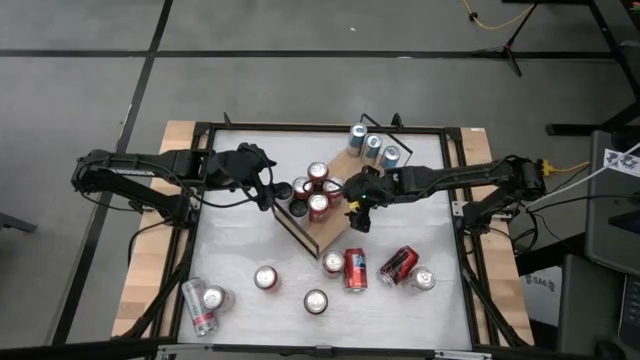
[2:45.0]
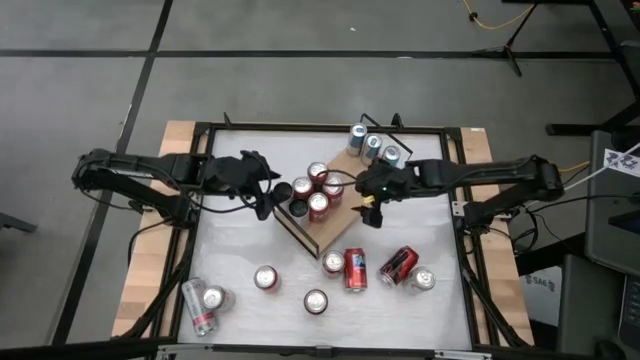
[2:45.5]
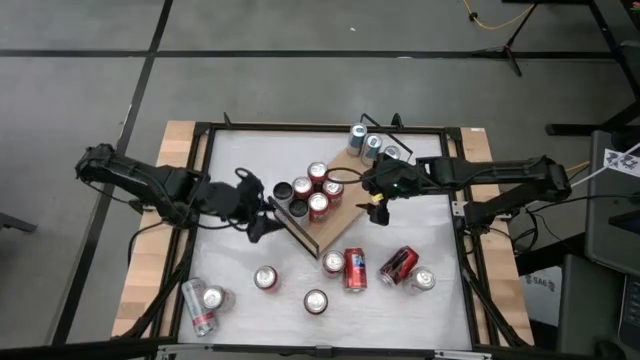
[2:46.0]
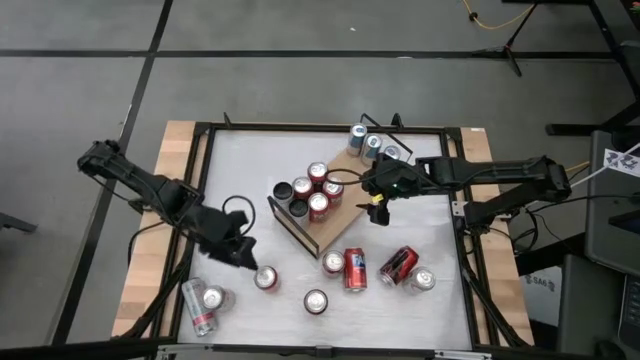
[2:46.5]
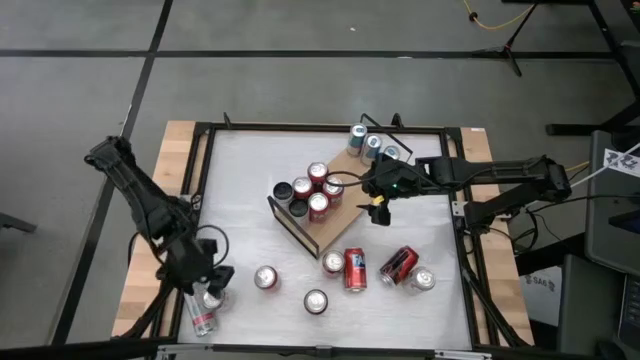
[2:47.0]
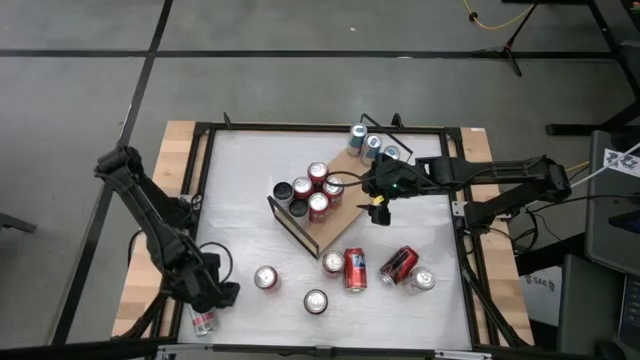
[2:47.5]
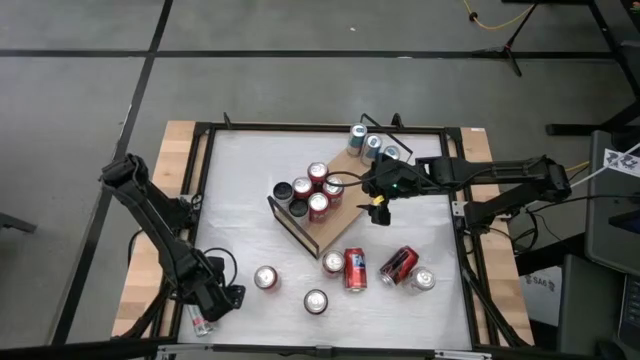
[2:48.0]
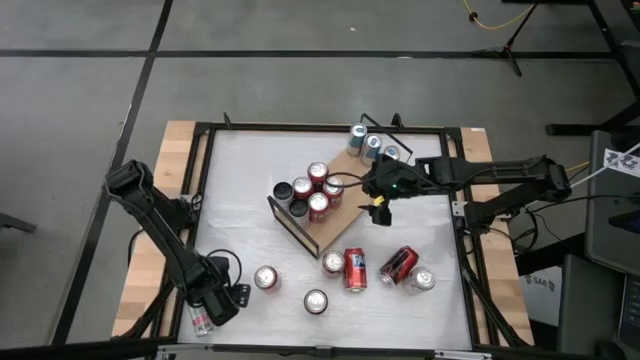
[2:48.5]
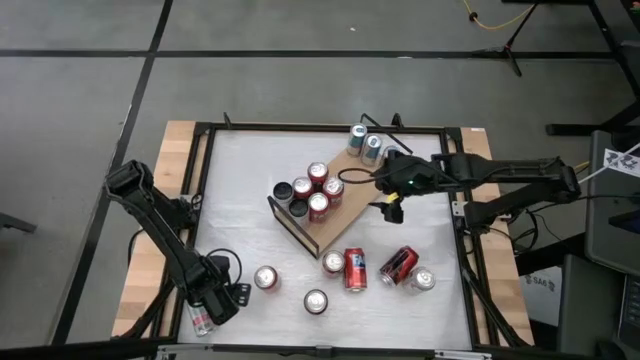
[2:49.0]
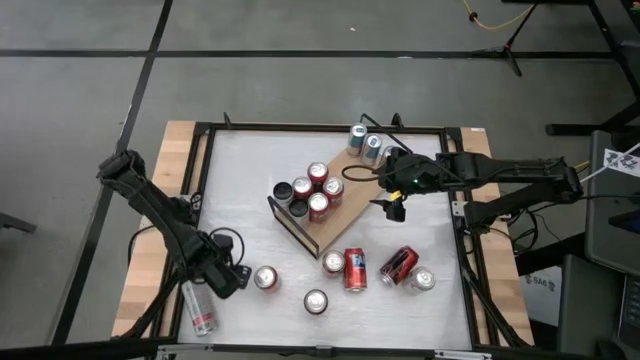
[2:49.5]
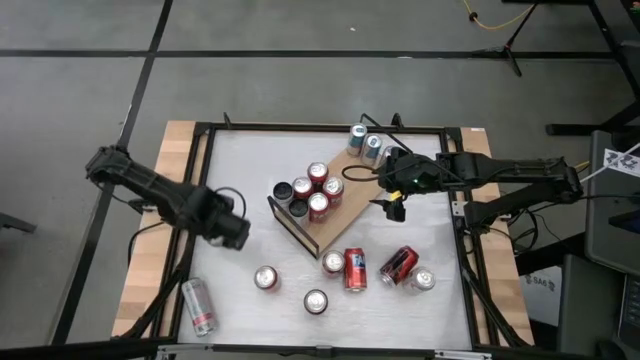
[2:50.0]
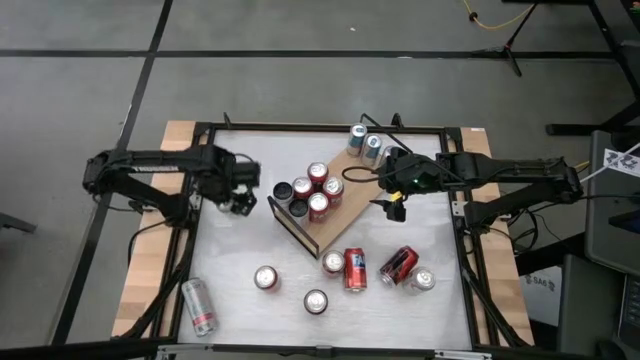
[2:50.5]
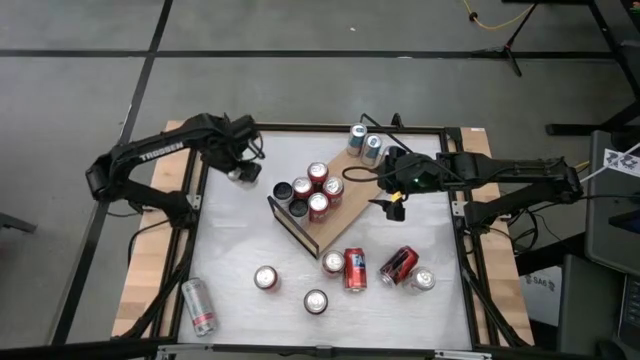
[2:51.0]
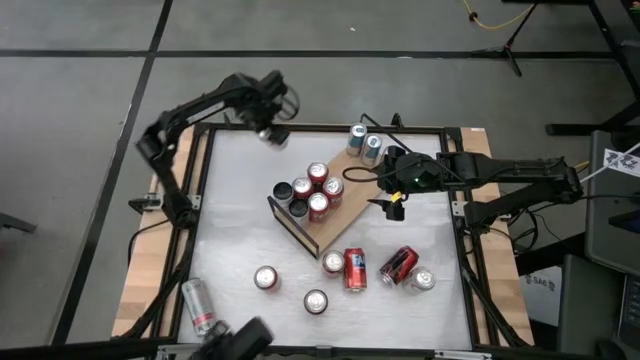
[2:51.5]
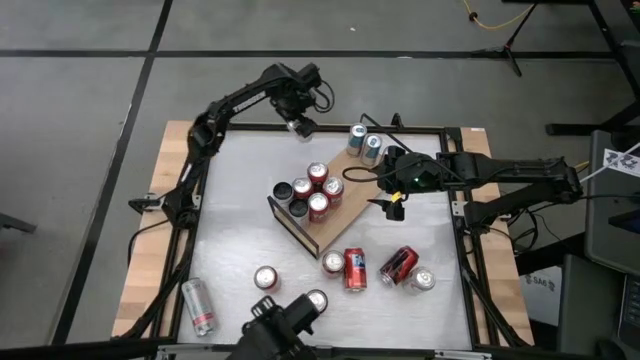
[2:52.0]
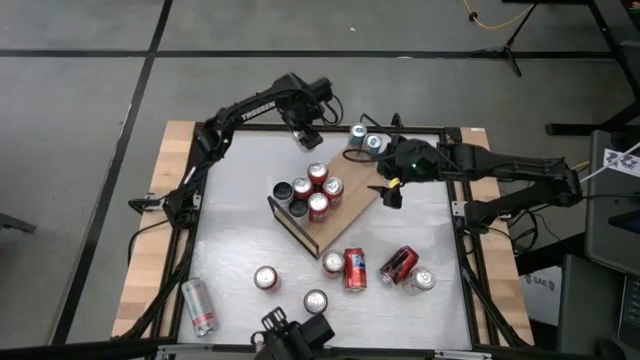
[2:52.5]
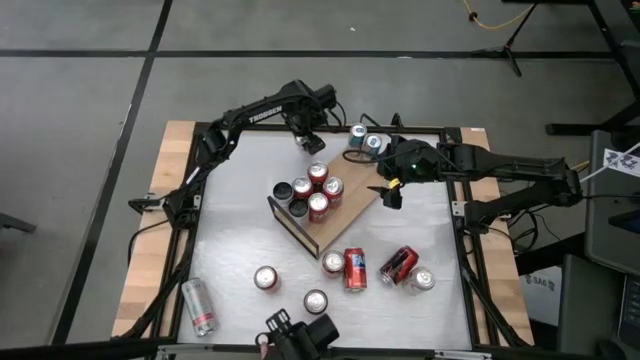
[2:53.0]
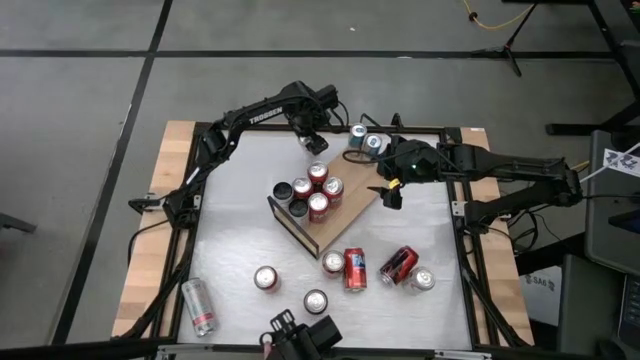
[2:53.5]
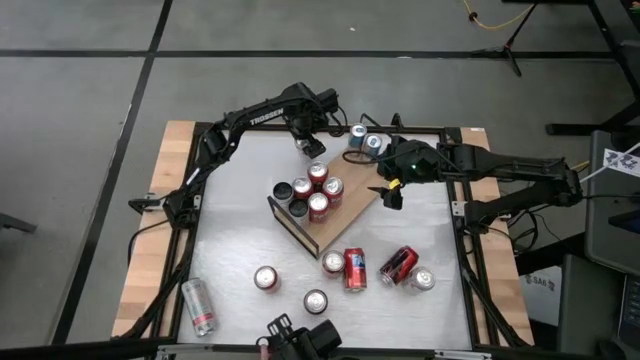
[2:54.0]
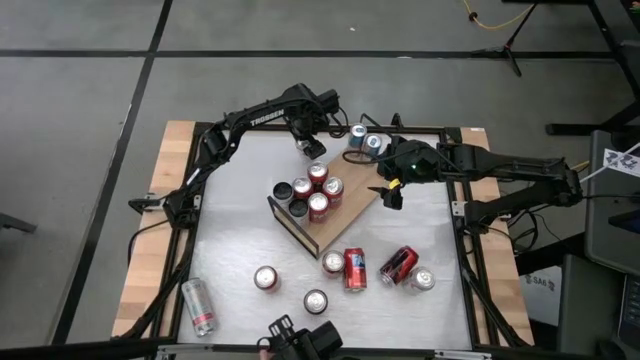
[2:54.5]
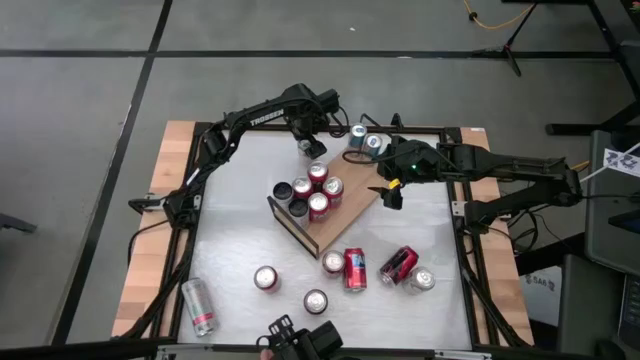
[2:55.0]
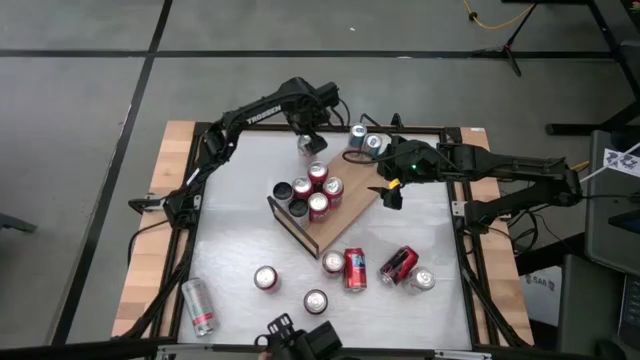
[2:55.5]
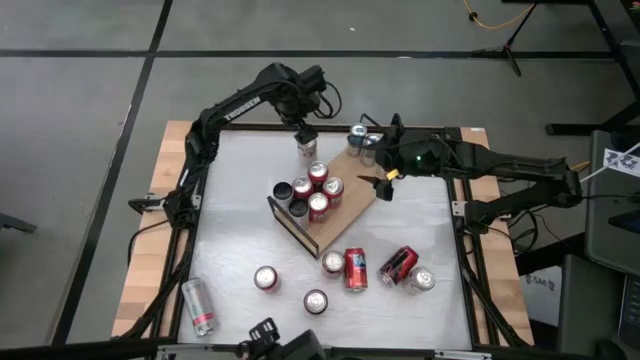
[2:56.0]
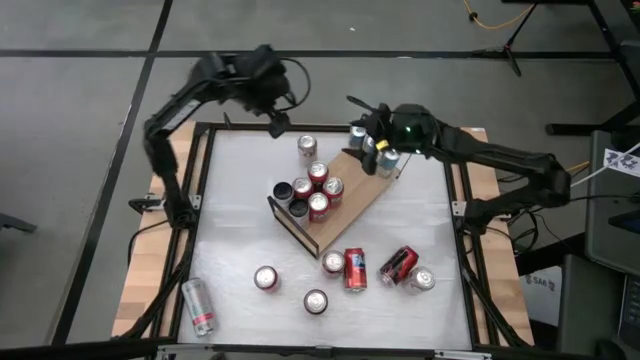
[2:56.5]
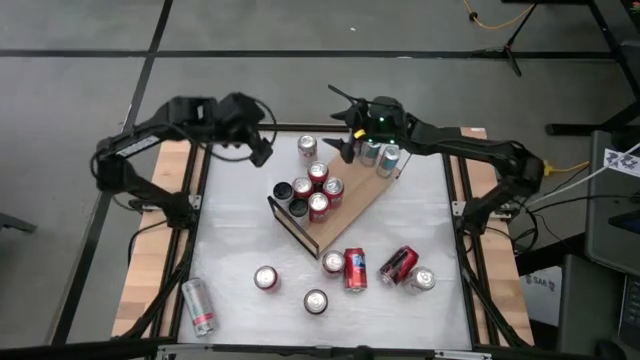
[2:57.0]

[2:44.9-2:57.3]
Task: Place canned beverage on shelf
Put the red silver soda can on the shelf

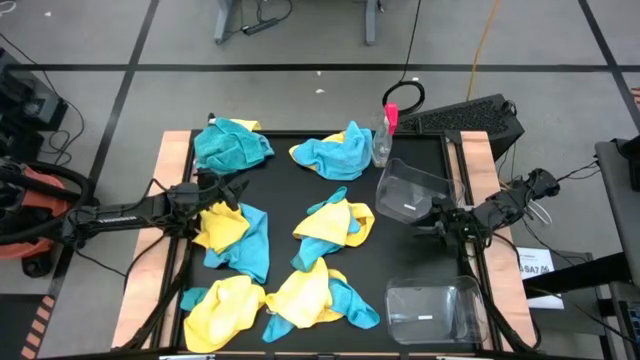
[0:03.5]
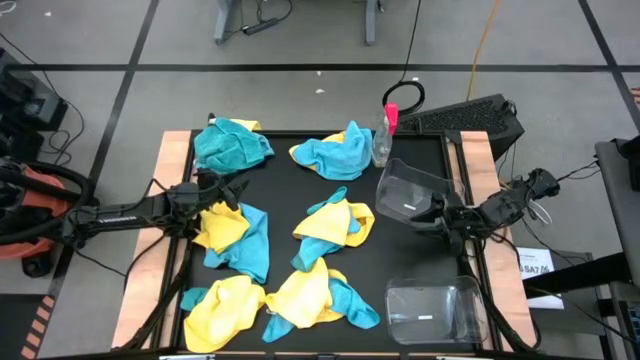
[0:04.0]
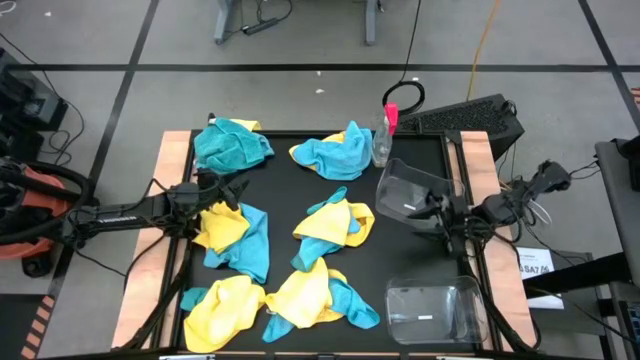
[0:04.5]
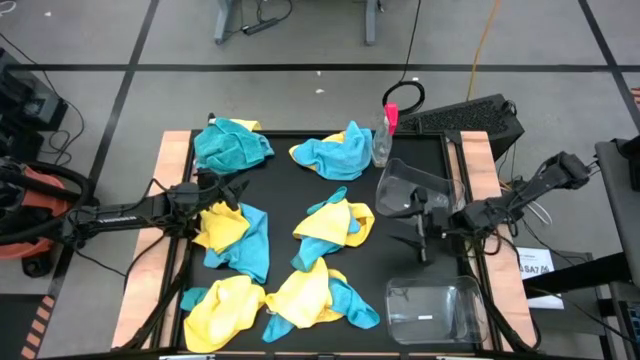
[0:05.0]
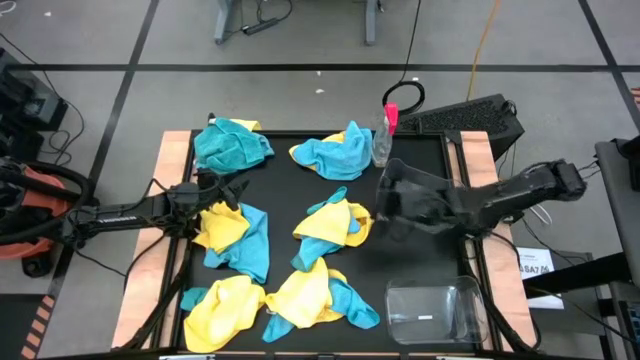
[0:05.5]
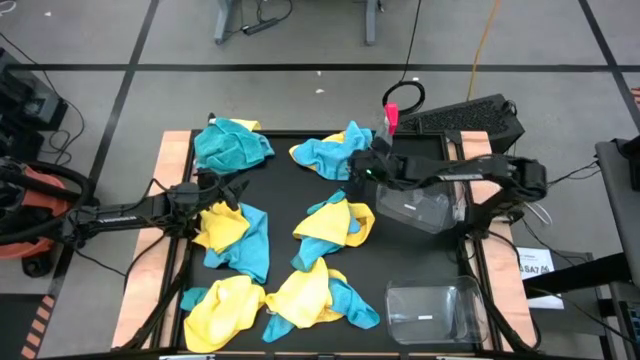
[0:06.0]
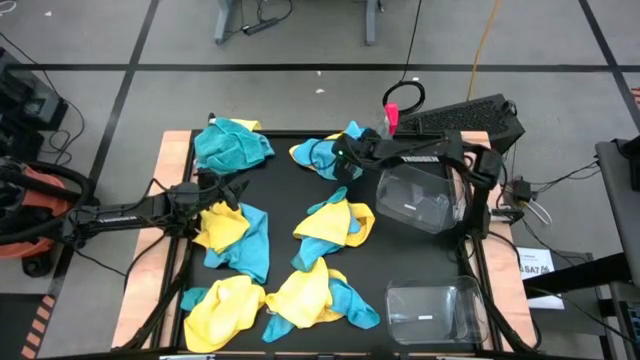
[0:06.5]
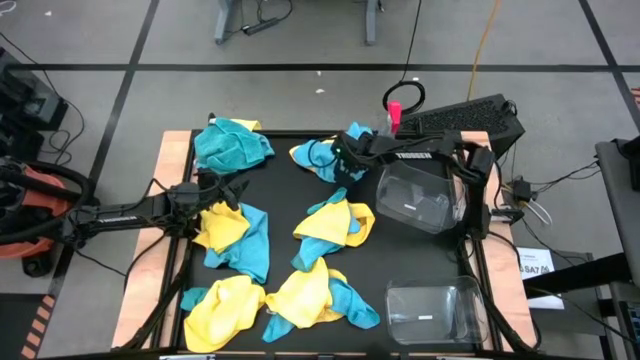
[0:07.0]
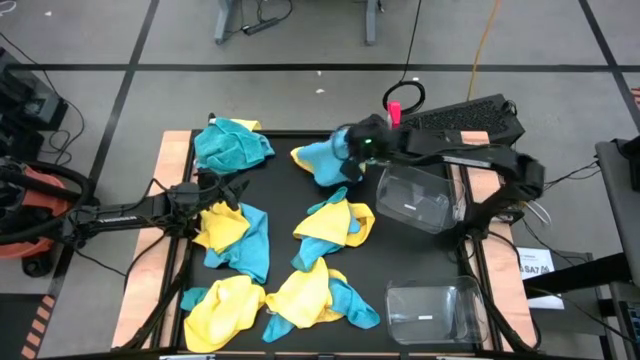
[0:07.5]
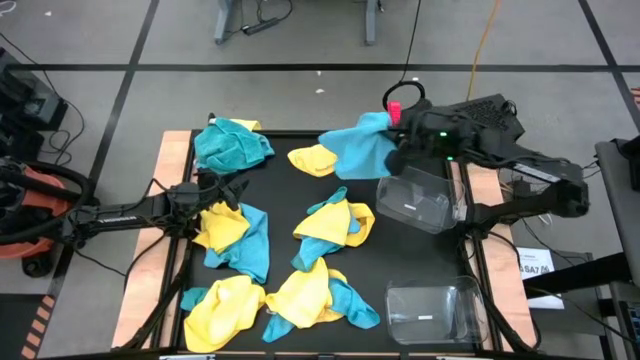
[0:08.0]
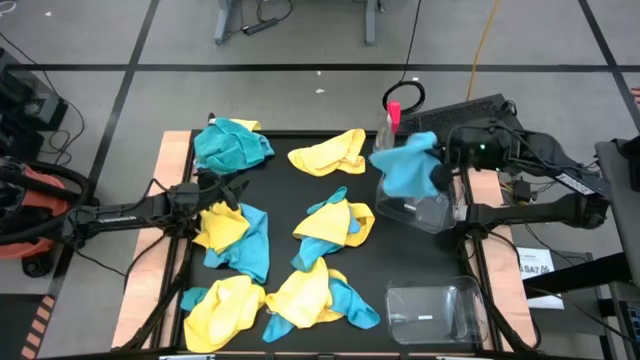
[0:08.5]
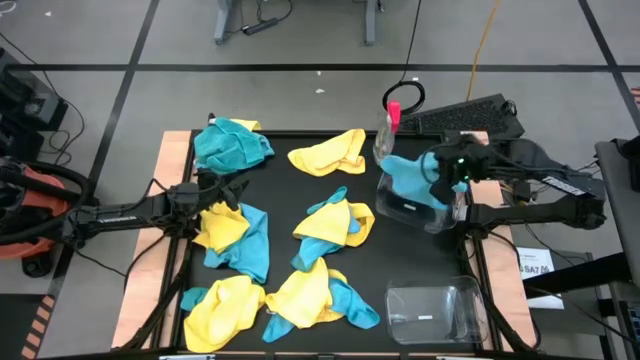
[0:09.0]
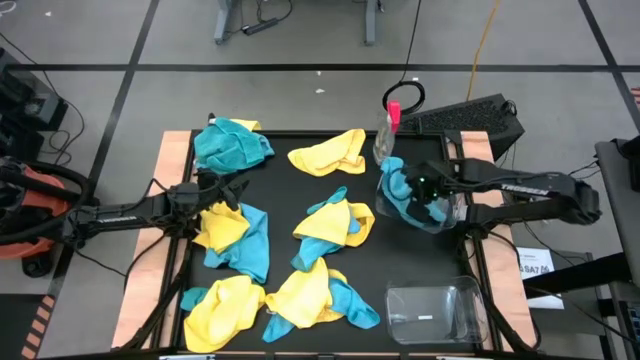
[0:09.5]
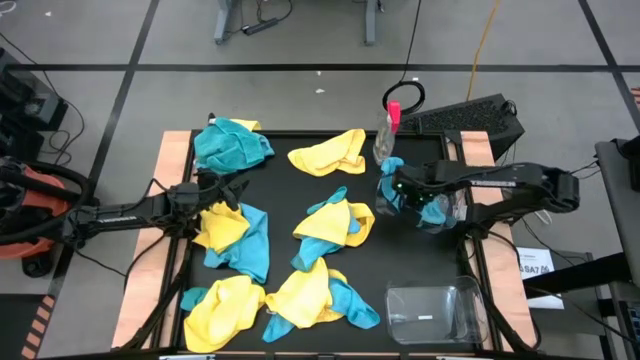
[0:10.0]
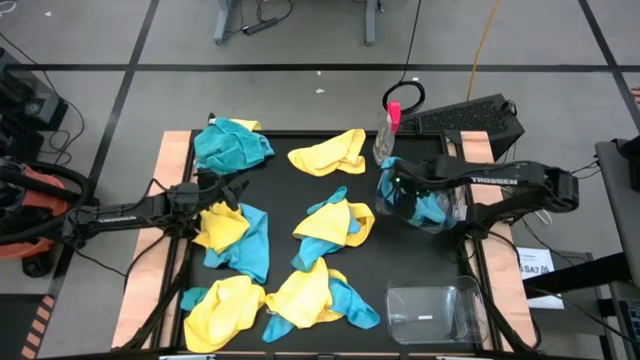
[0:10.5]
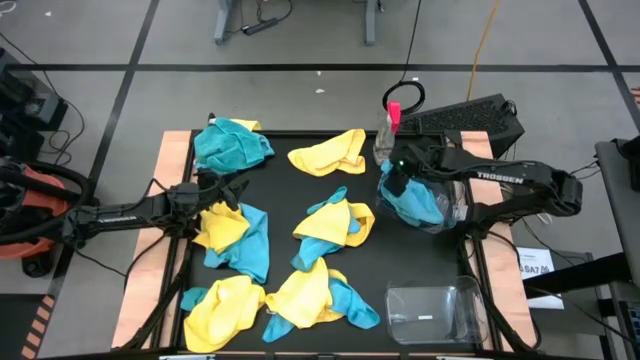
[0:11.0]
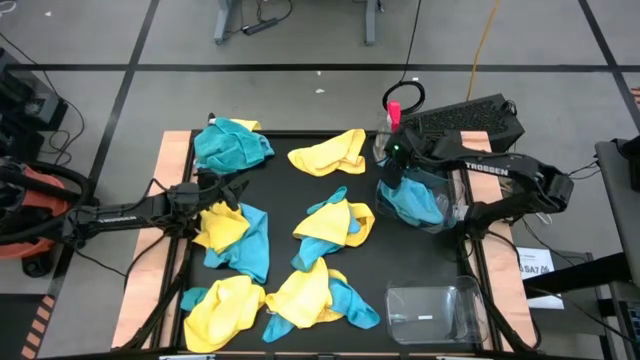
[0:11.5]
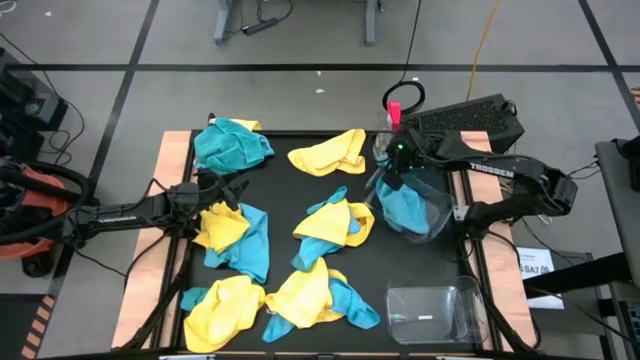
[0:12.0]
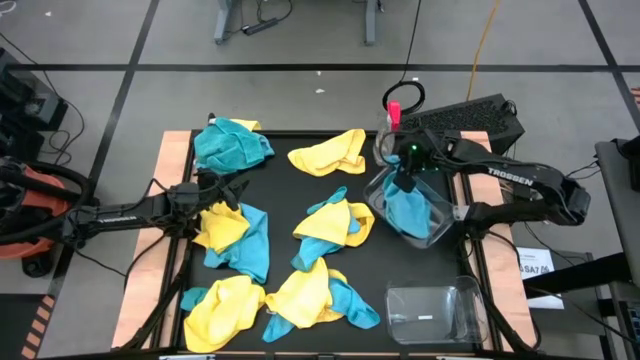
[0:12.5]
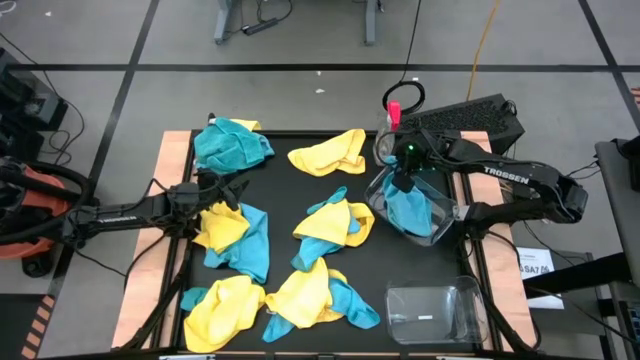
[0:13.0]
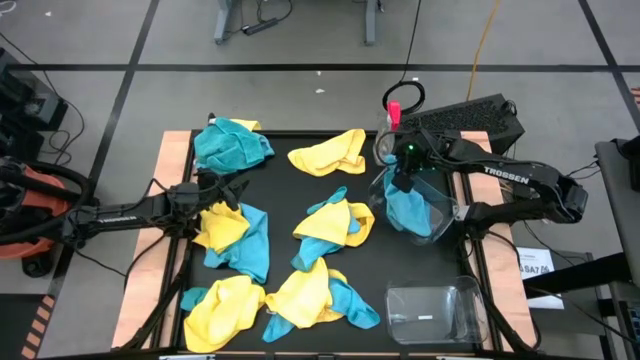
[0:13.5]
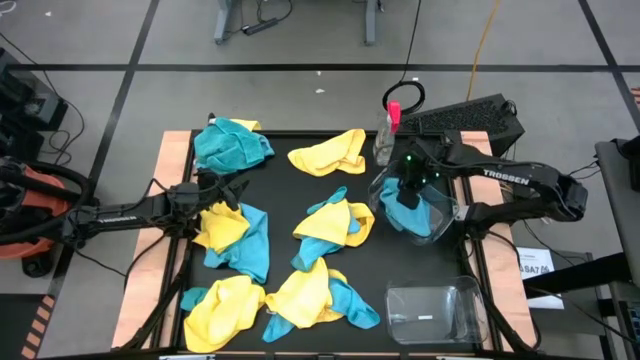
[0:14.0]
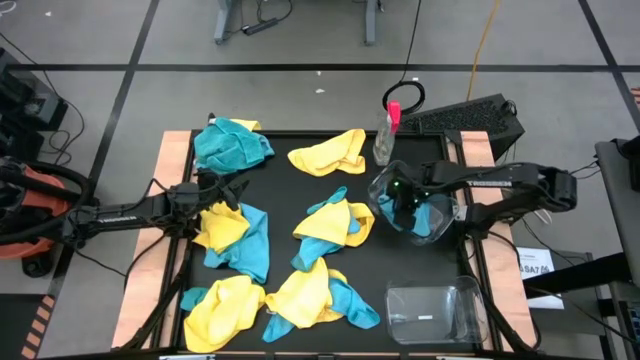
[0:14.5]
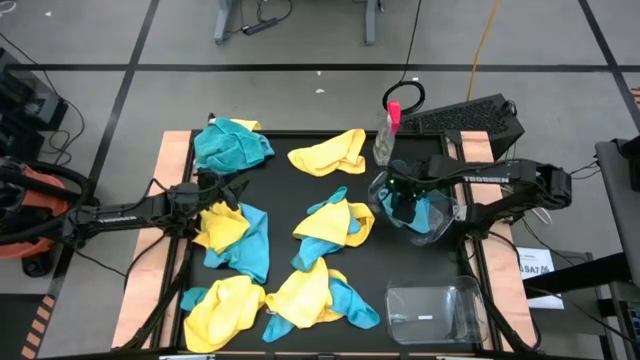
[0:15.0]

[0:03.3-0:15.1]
Task: Sort microfiber towel by color & place in baskets
Put the blue towel into the top transparent bin
